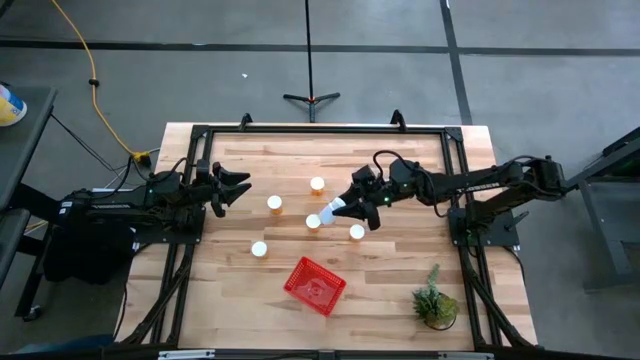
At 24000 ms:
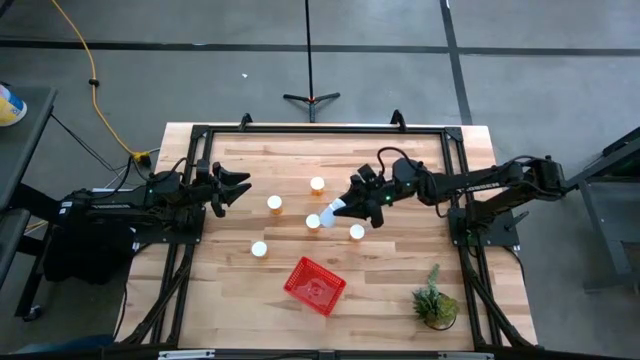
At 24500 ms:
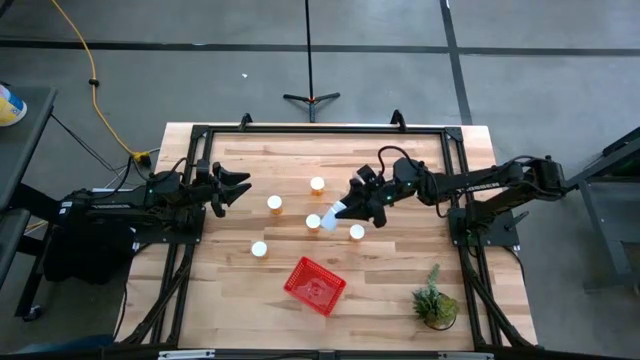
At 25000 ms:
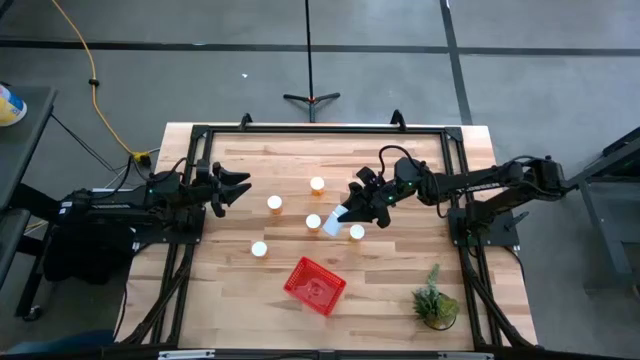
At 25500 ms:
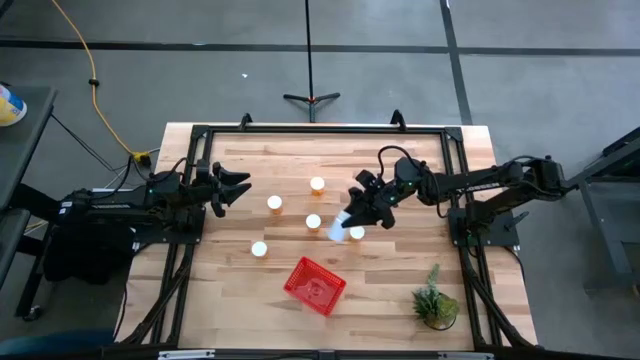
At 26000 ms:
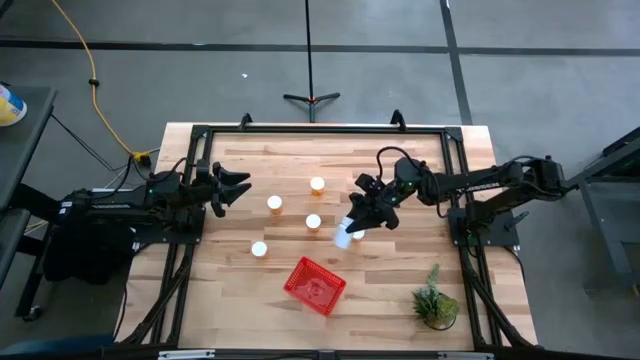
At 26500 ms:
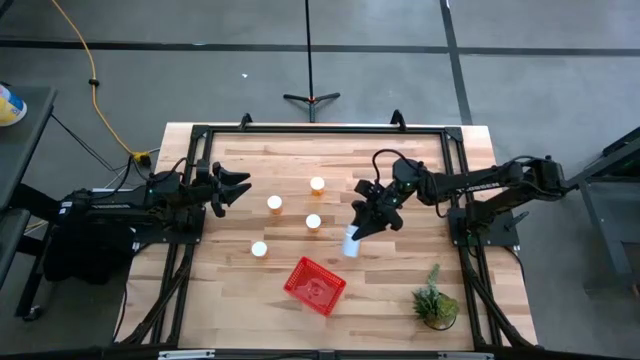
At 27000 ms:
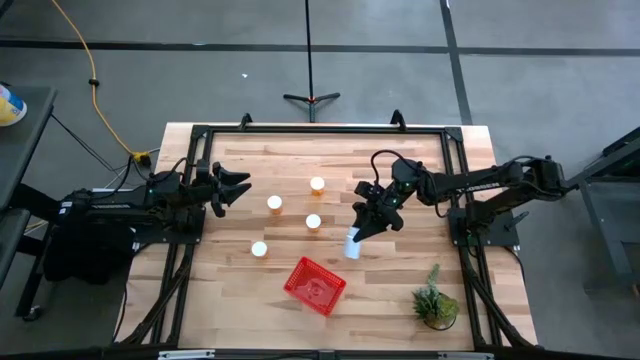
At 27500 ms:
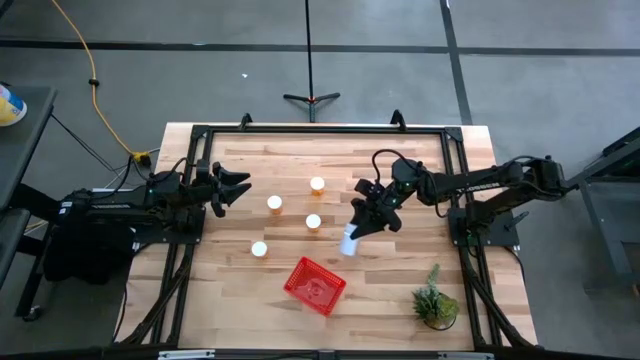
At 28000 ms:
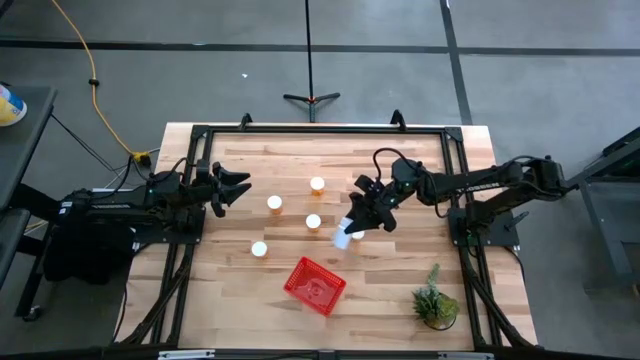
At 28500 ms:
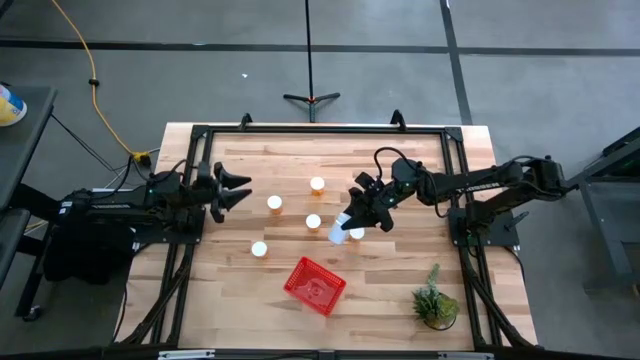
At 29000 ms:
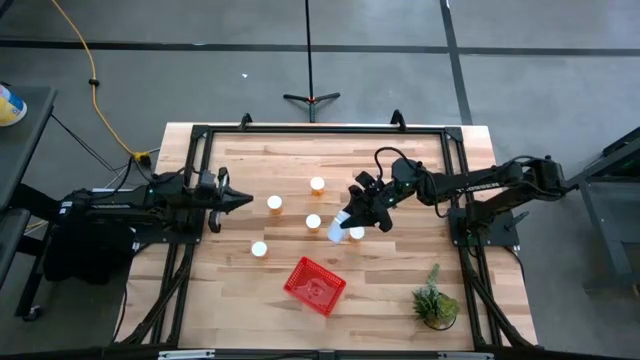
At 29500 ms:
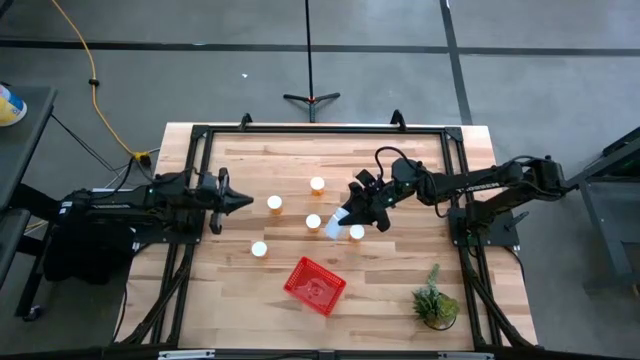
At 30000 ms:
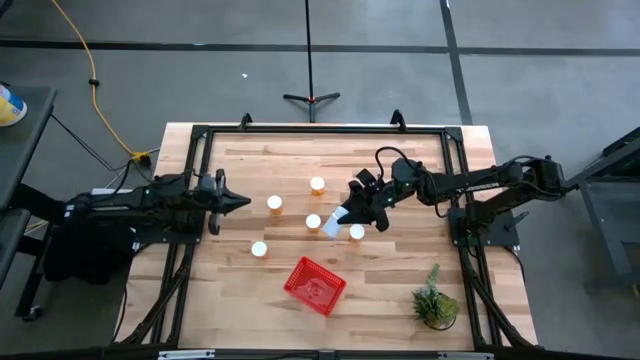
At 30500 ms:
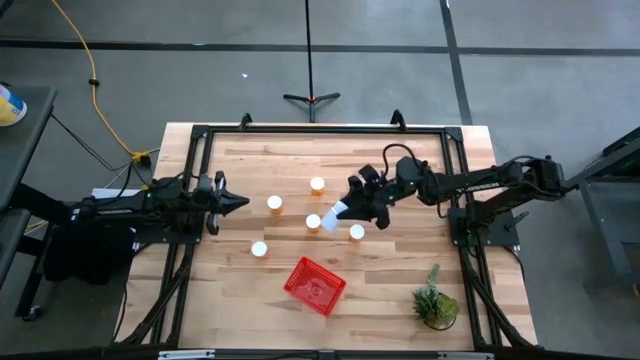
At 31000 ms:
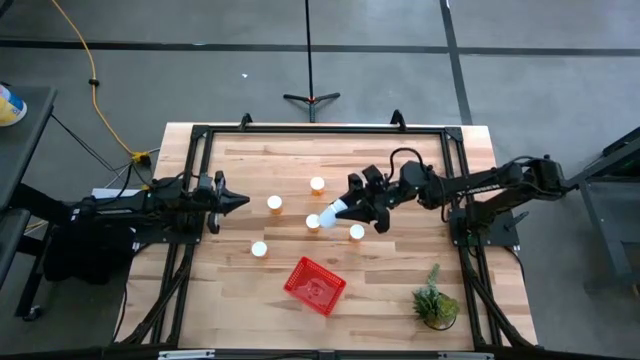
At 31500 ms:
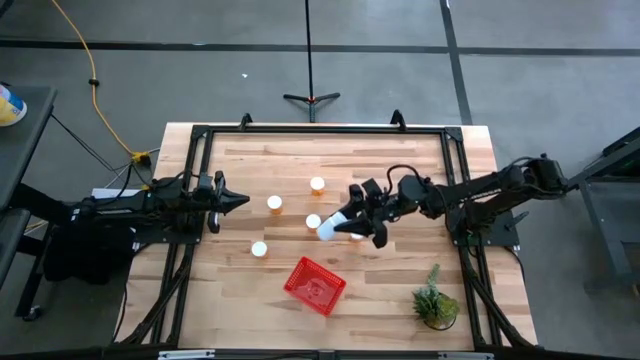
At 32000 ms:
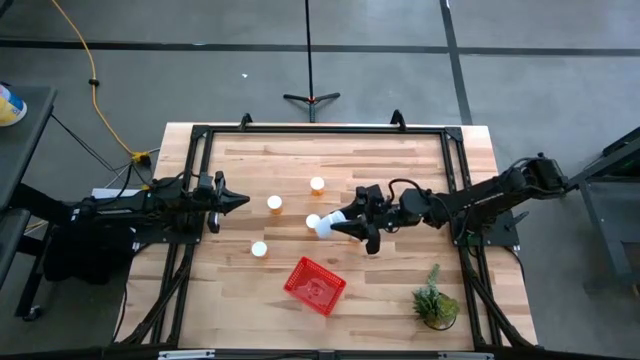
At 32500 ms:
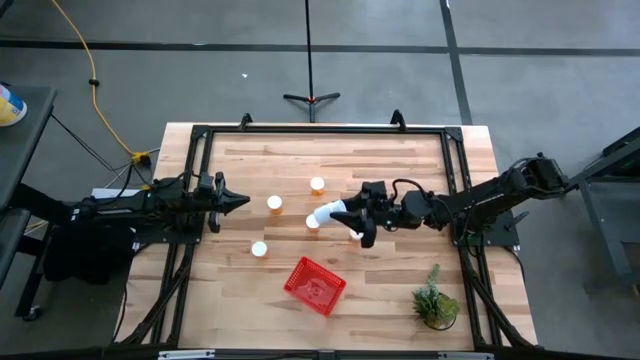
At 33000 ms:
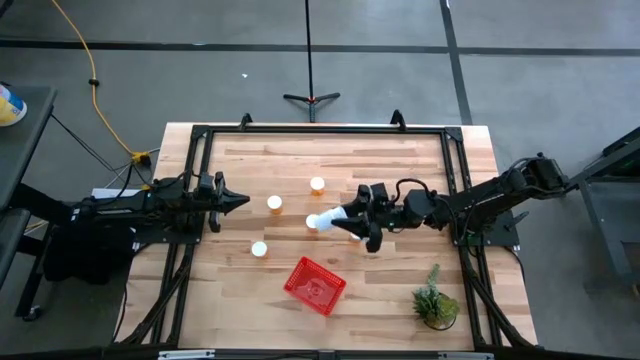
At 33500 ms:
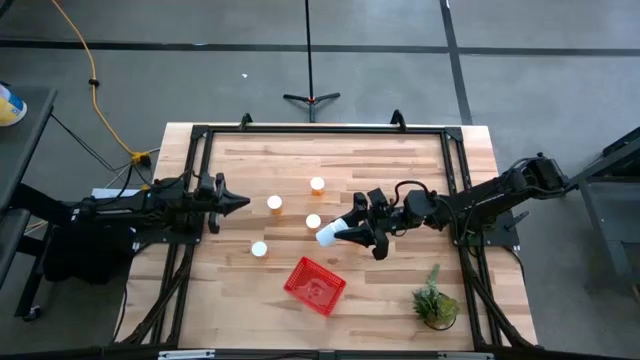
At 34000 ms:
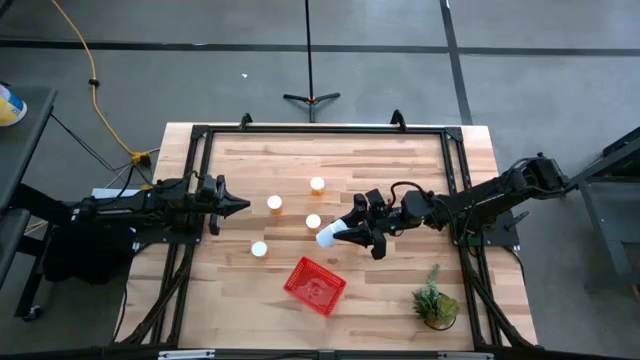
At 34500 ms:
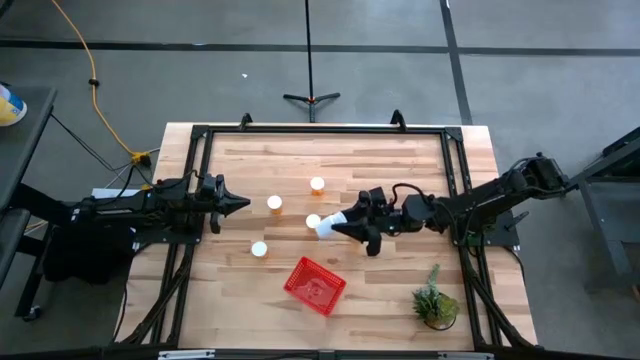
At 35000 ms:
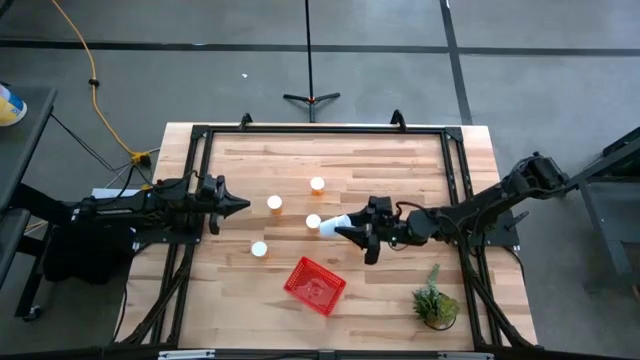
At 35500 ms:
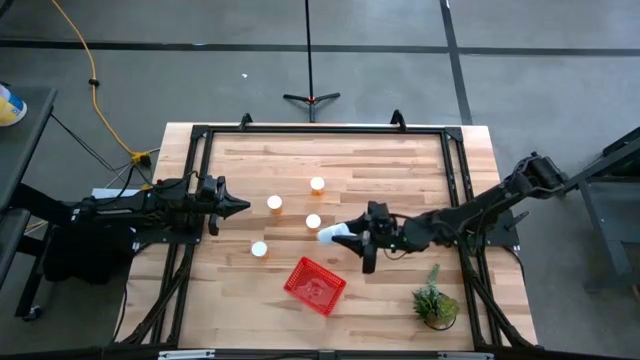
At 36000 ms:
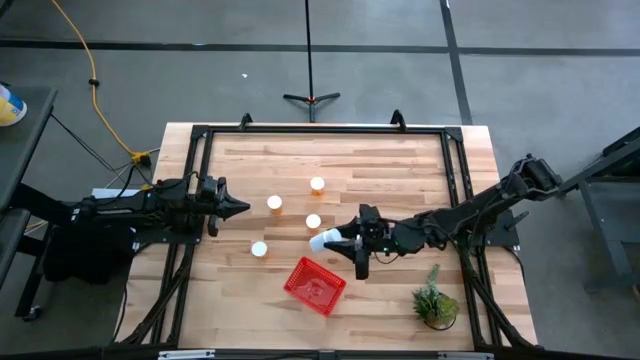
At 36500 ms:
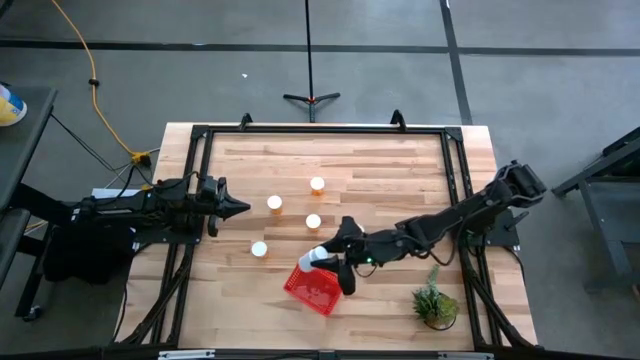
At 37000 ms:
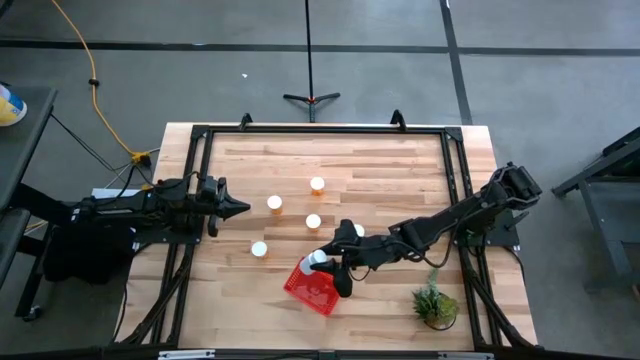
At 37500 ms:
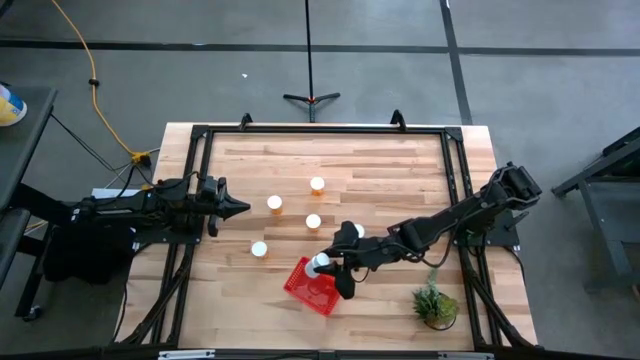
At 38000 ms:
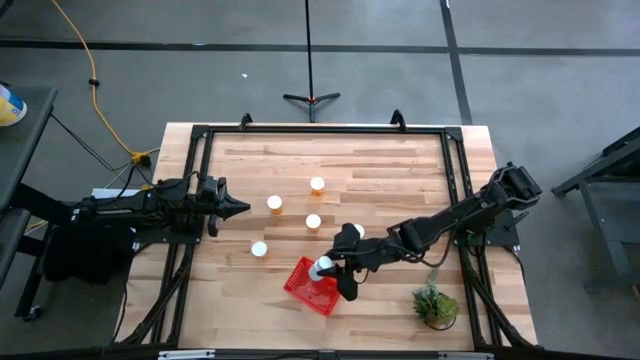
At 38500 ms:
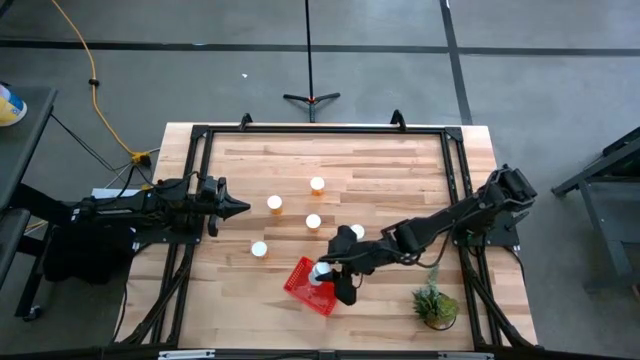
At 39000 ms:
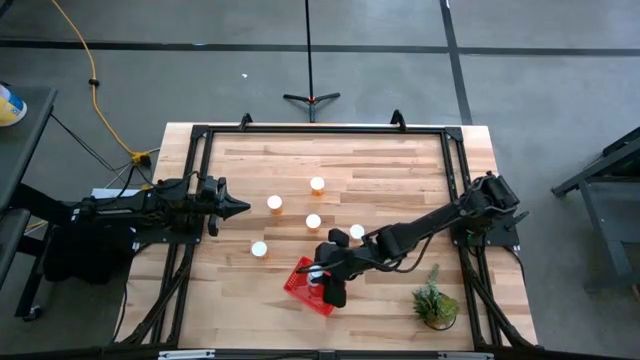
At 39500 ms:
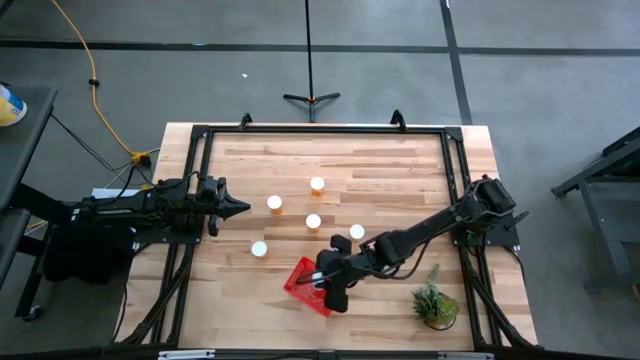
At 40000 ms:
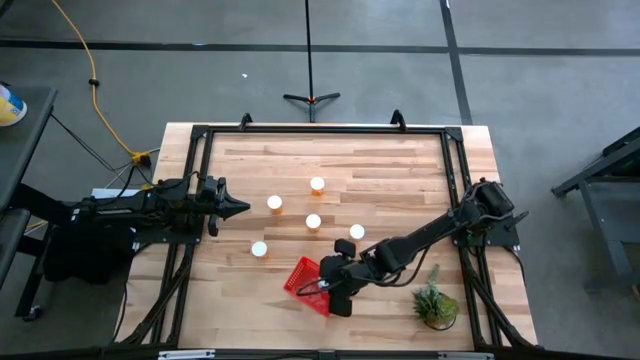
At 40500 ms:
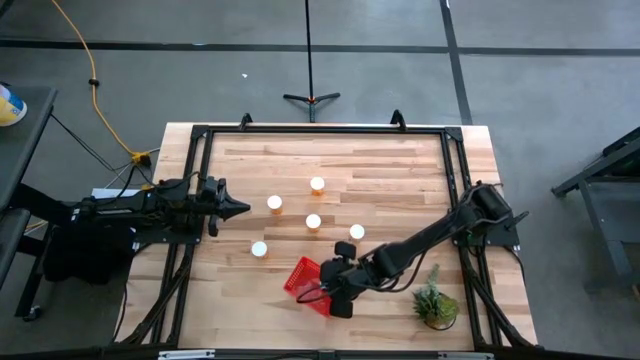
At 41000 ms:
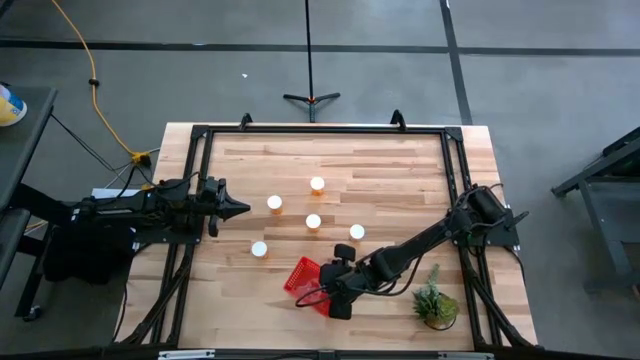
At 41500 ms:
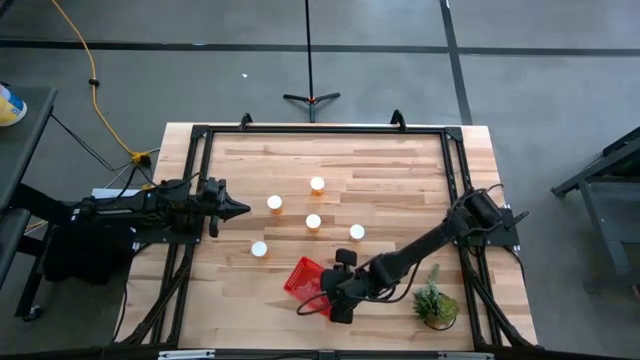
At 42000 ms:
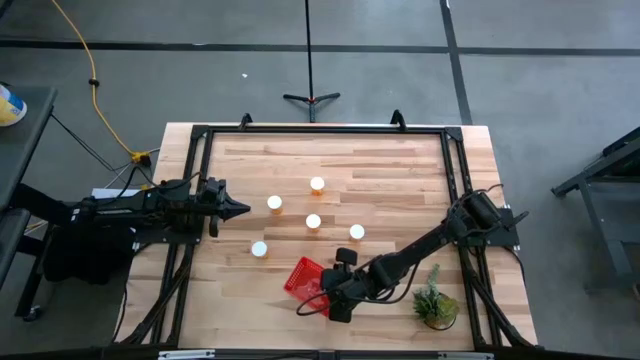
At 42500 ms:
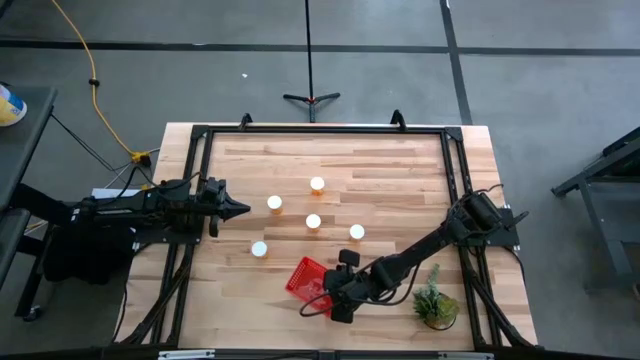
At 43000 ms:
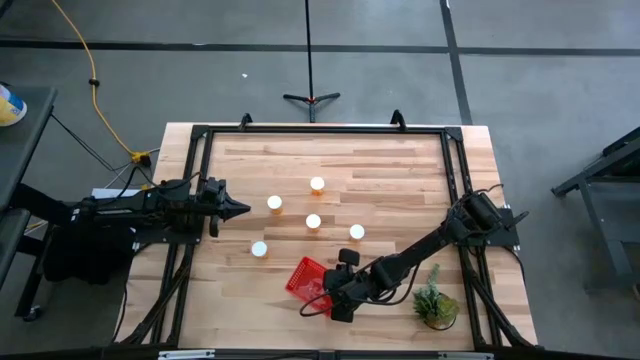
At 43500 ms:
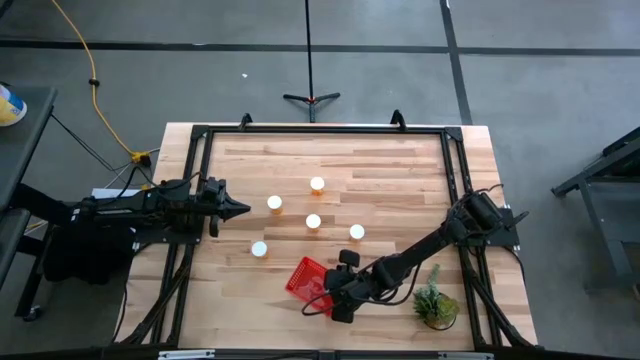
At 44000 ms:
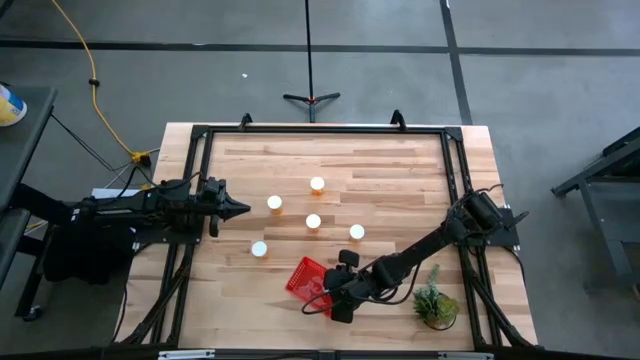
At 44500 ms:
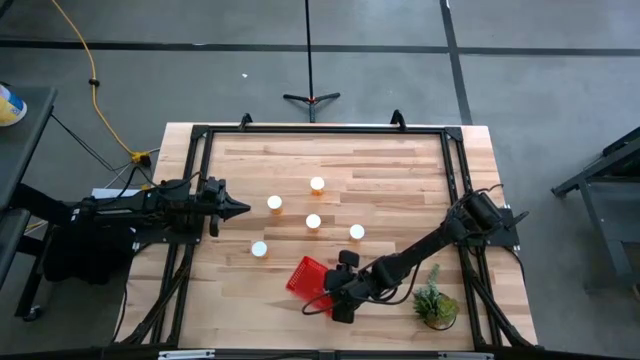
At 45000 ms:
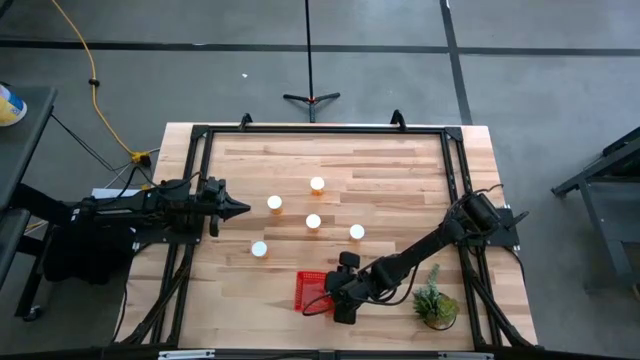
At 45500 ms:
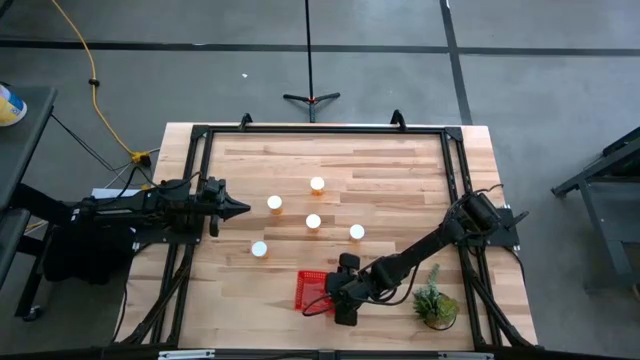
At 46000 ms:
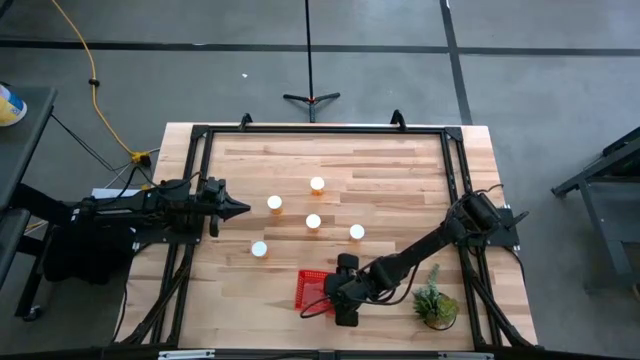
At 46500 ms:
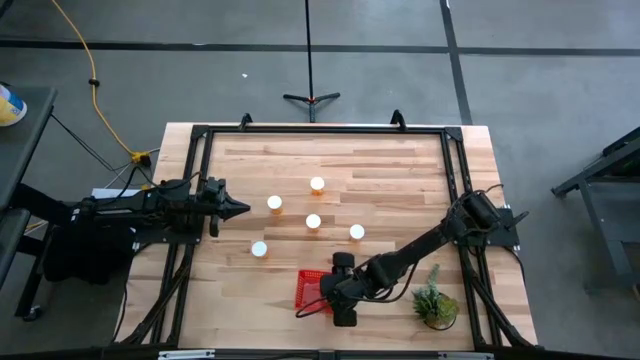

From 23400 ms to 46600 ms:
Task: Pick and place pill bottles into a basket
Put the white pill bottle into the red basket
